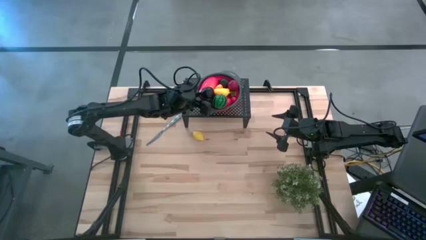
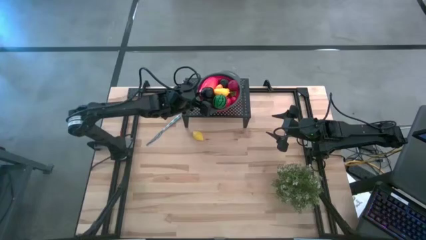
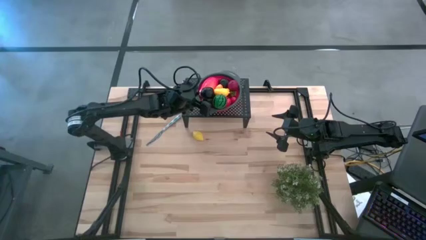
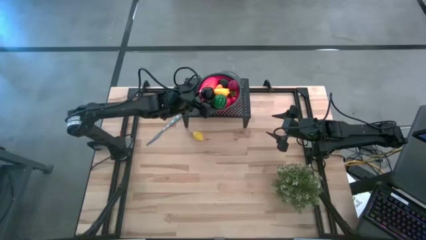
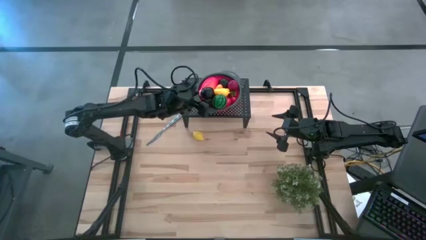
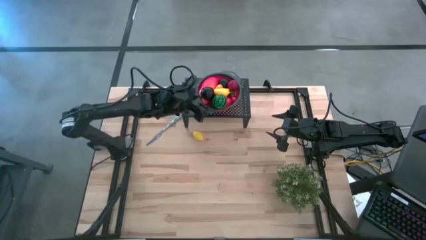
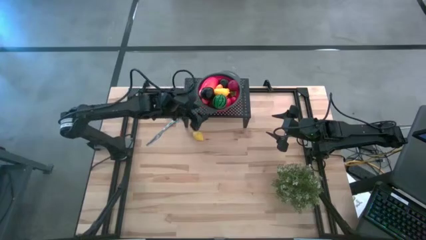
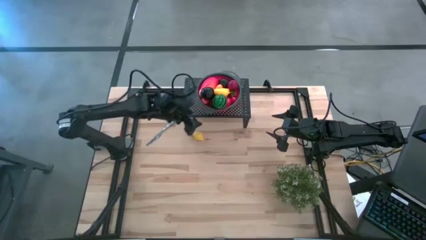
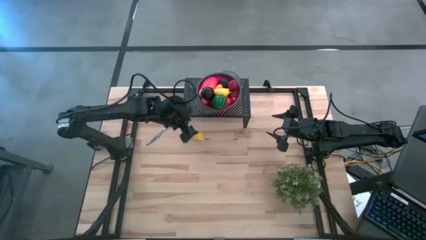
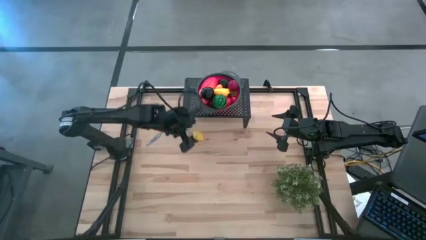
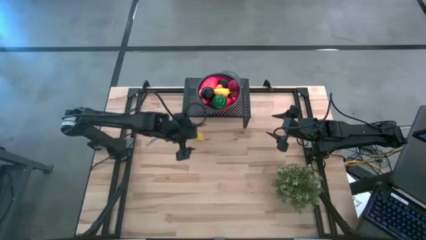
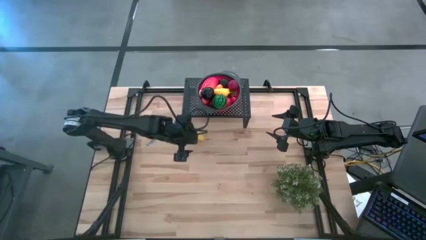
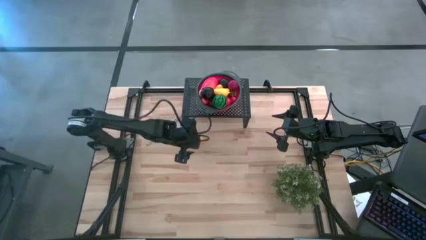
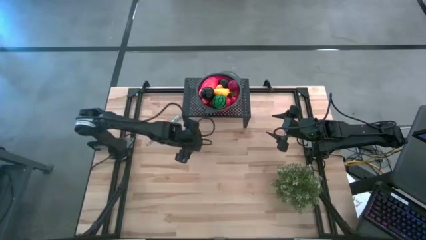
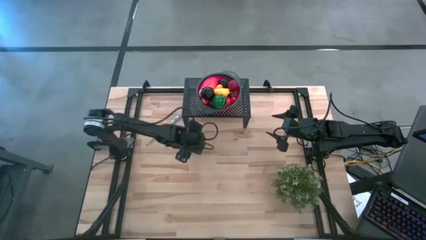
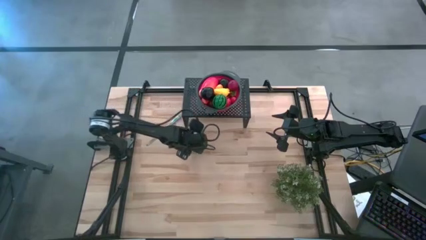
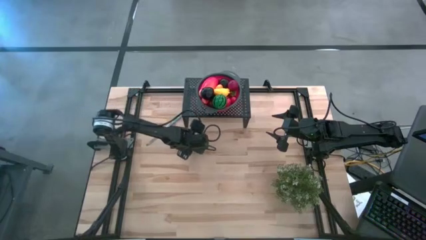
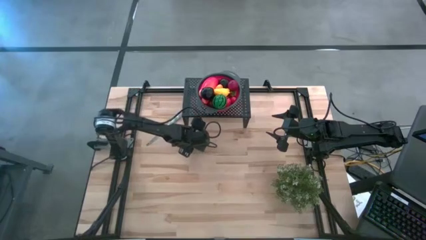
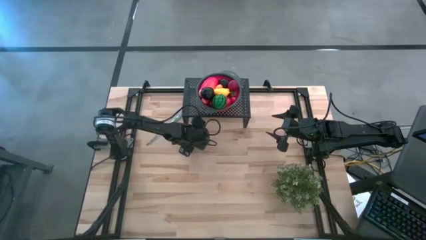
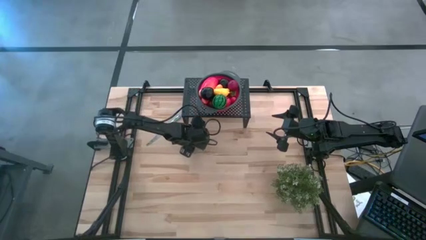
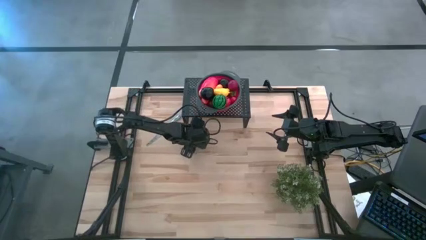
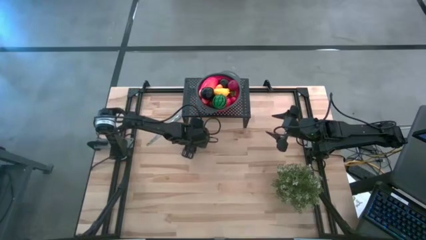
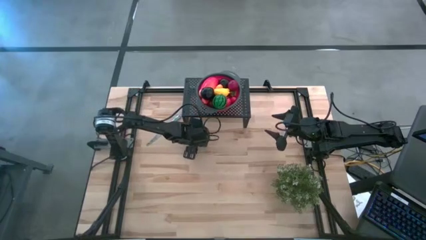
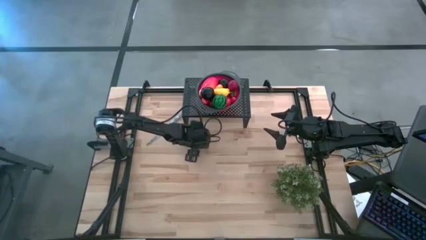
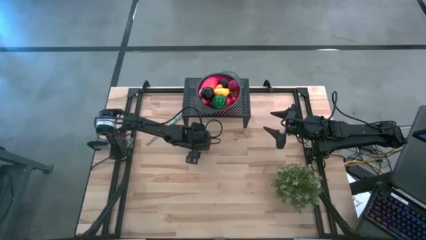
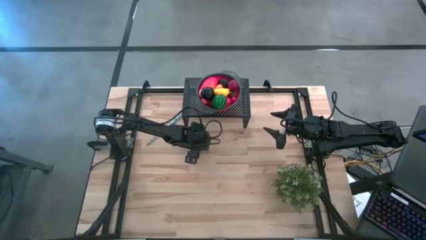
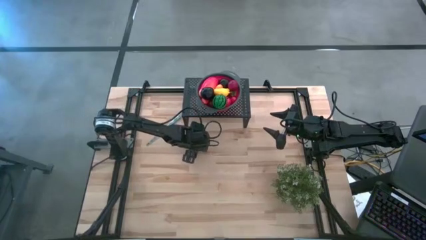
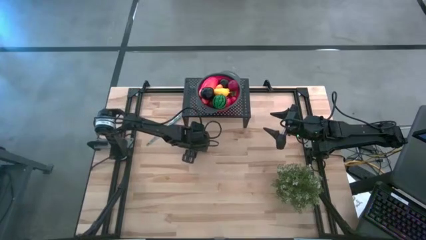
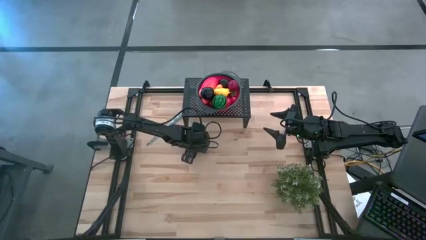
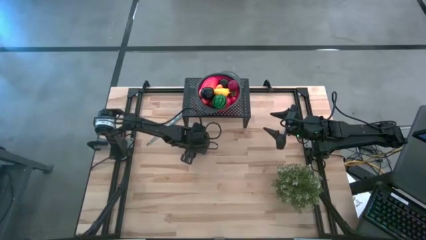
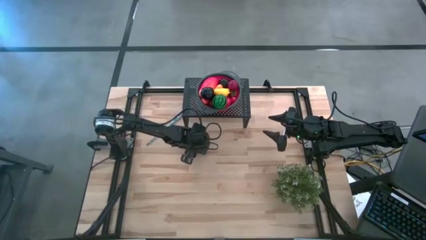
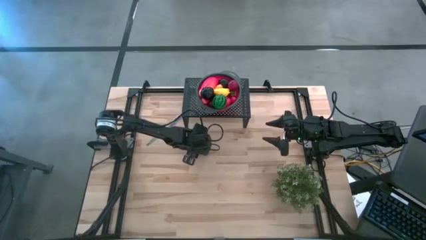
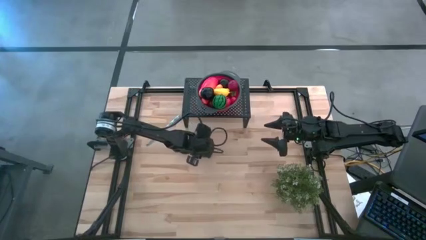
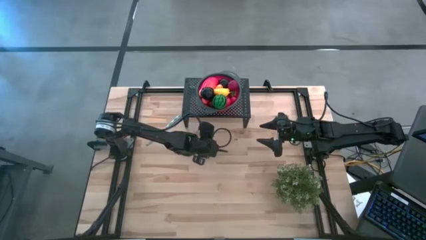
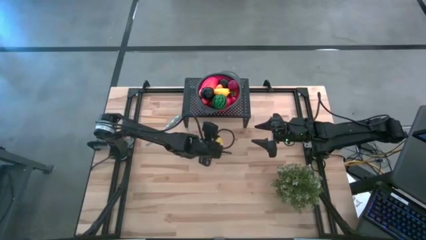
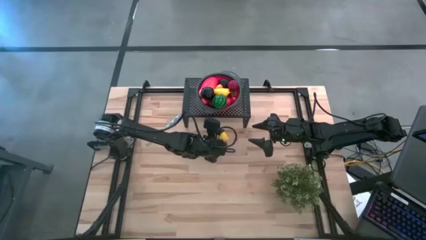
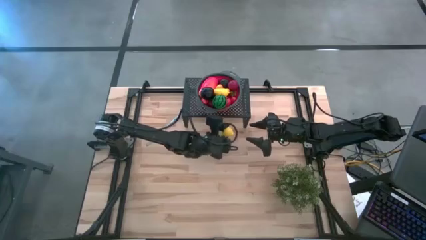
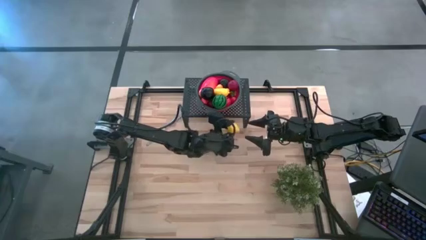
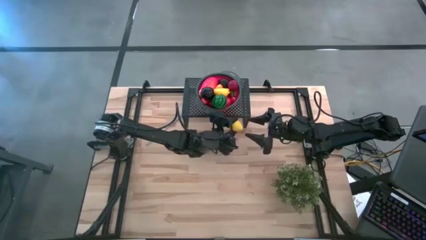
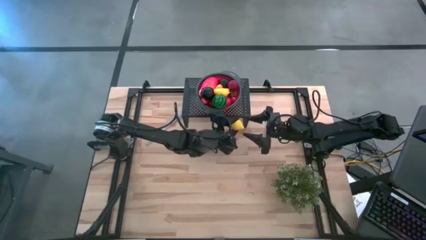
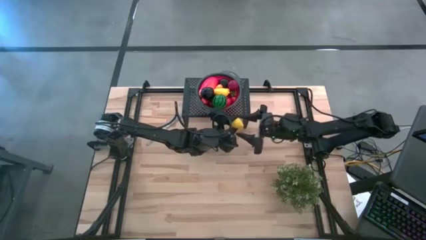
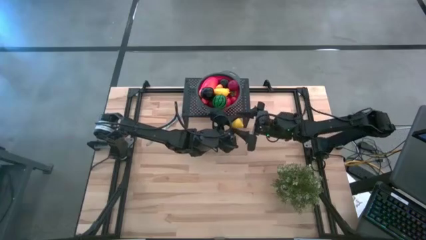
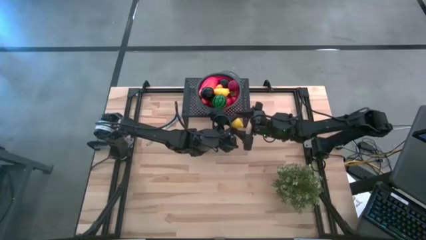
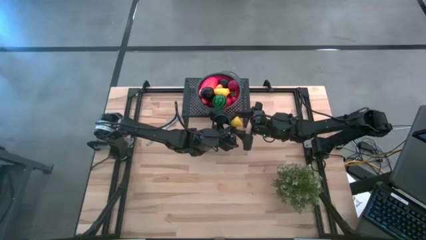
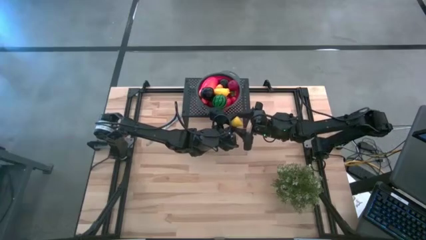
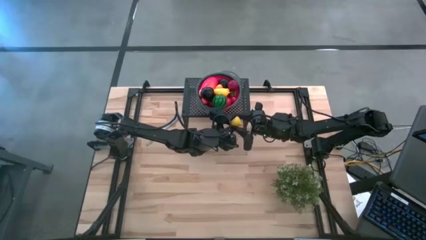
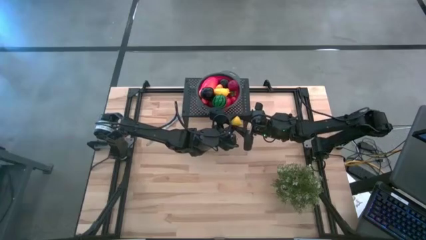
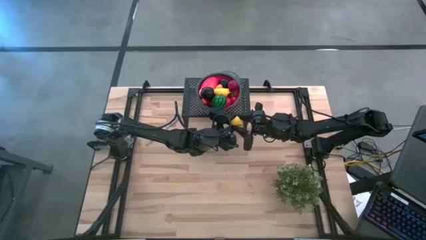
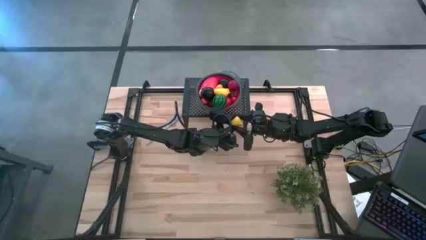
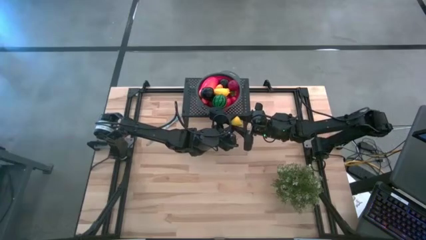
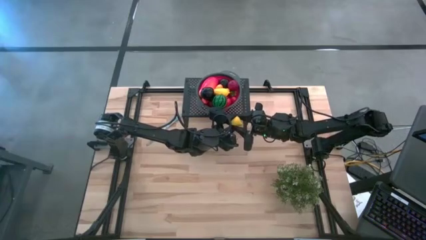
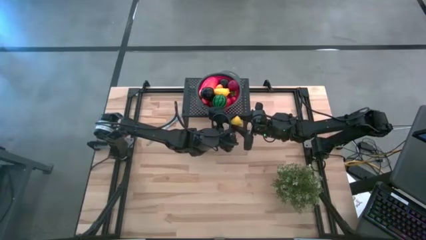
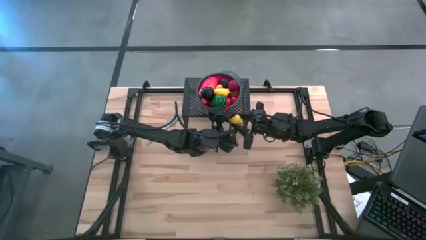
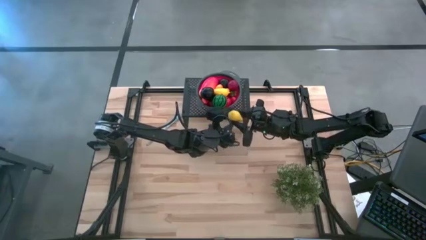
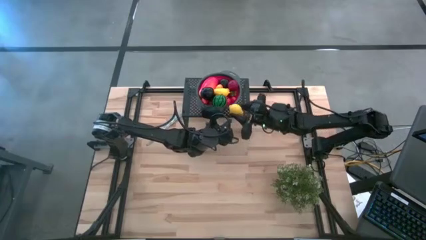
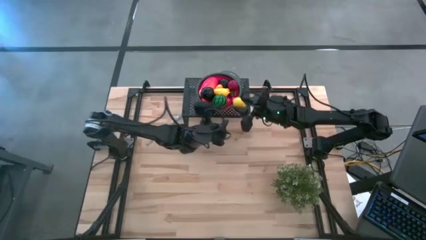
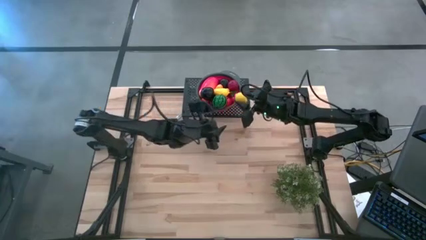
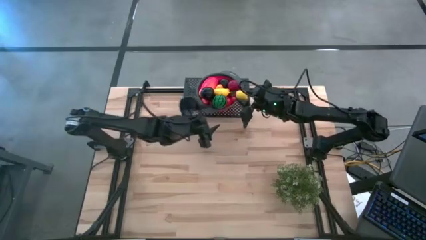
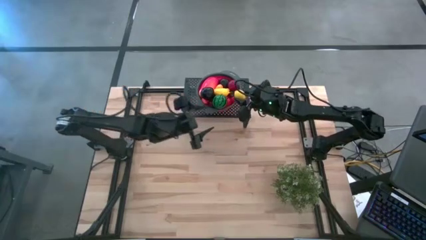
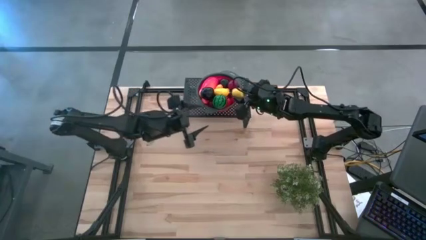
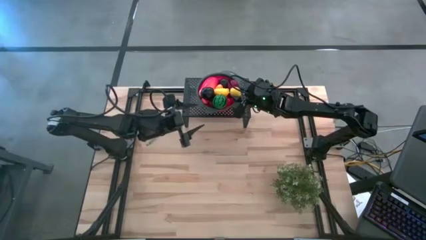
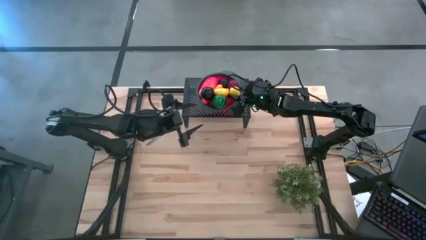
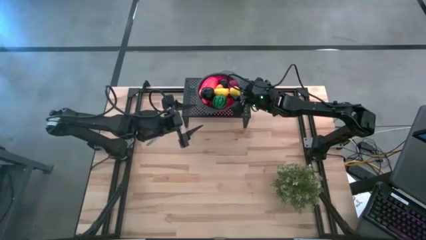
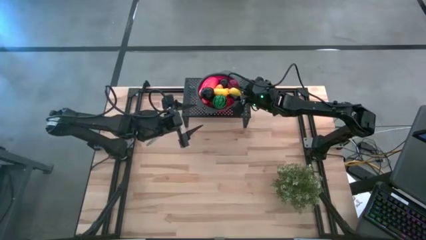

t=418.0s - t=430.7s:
Task: Pick & Place Fruit
Put the lemon in the red colander on the shelf

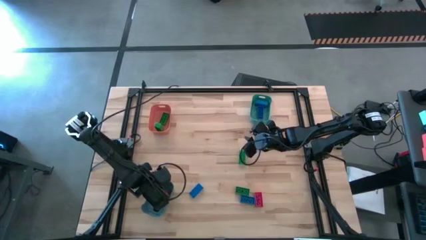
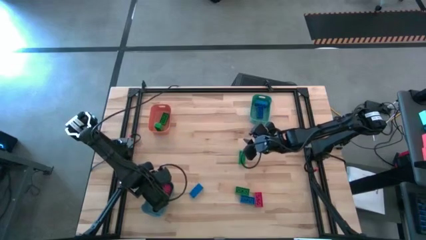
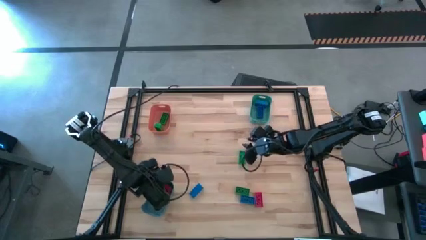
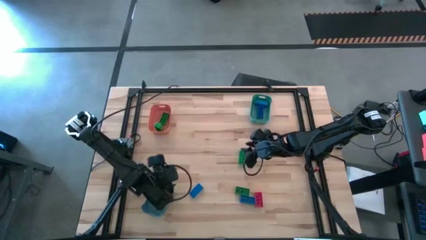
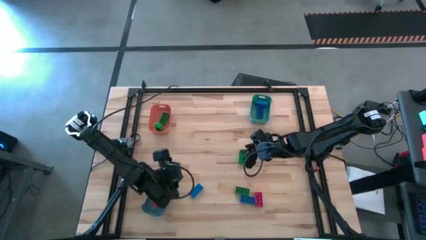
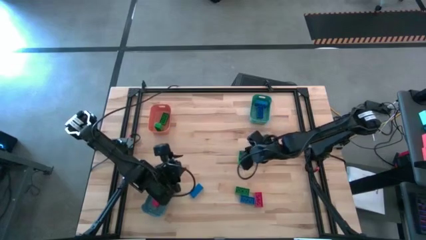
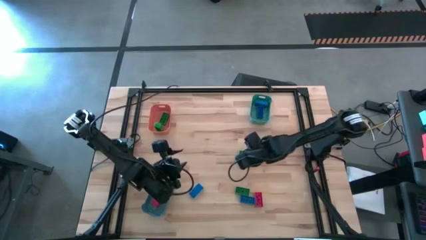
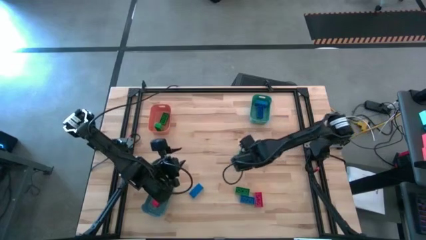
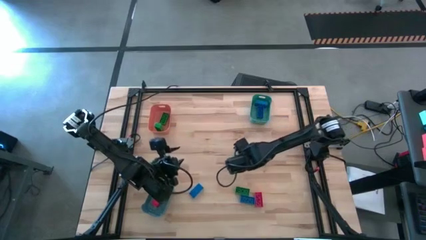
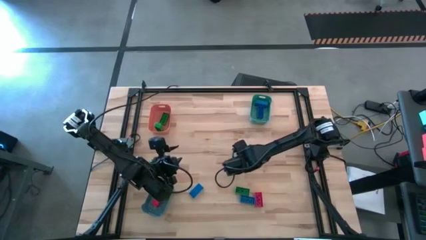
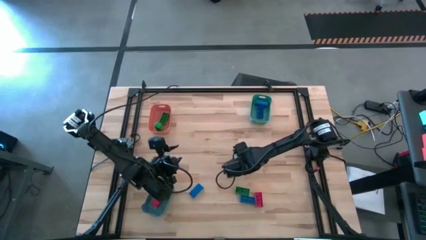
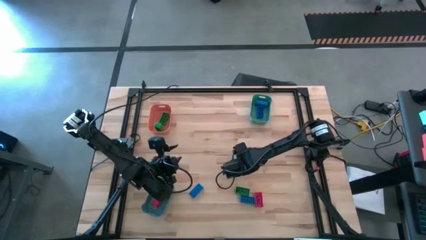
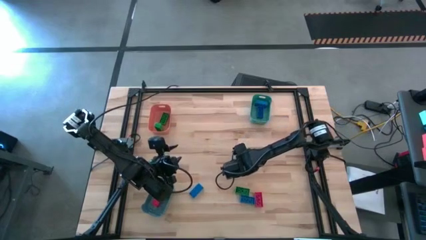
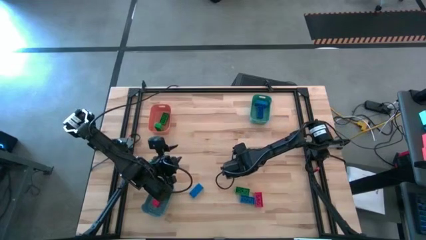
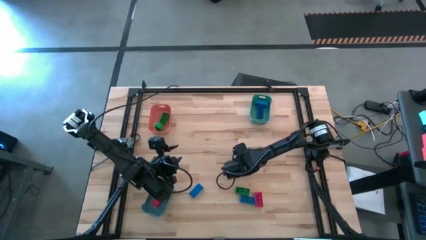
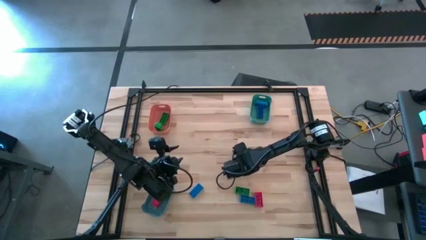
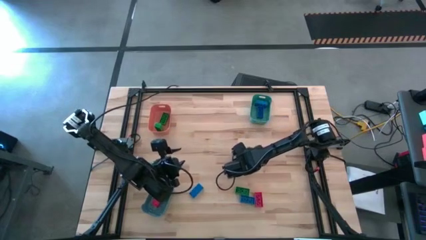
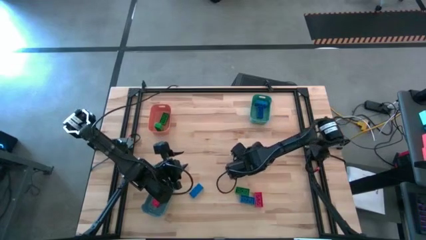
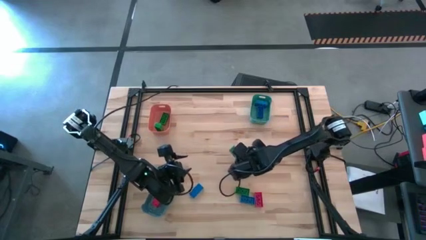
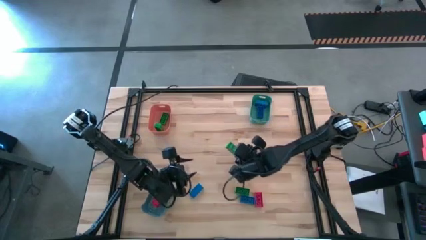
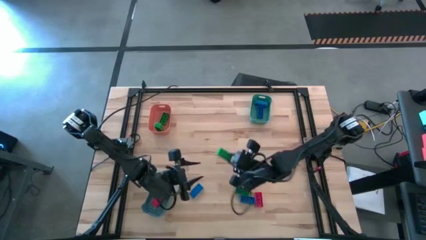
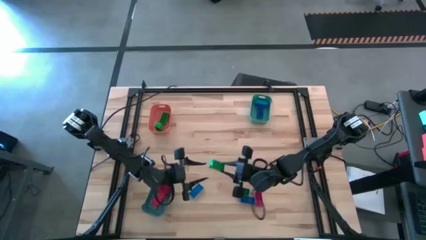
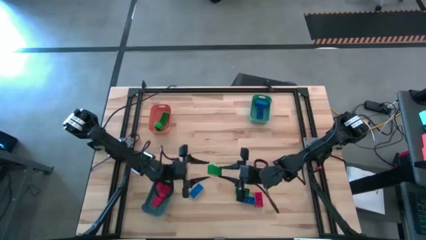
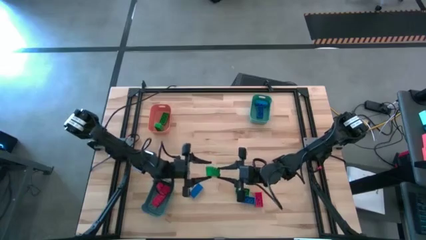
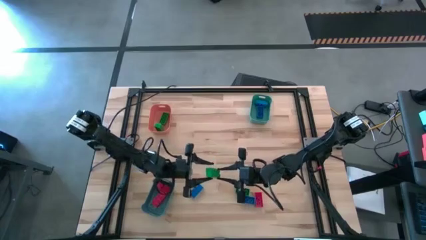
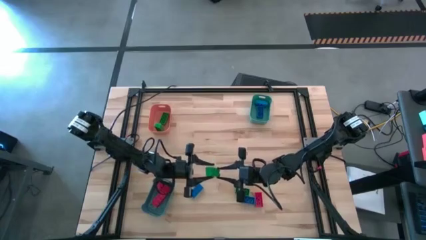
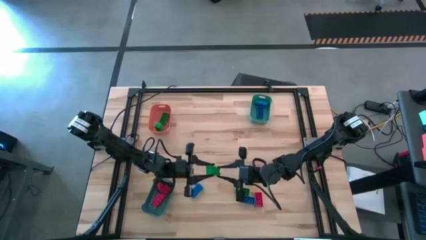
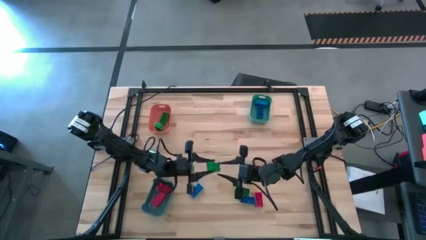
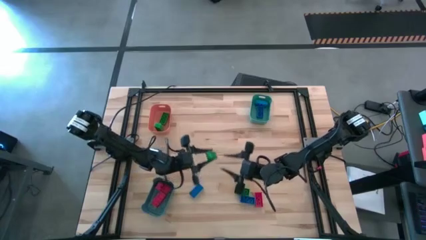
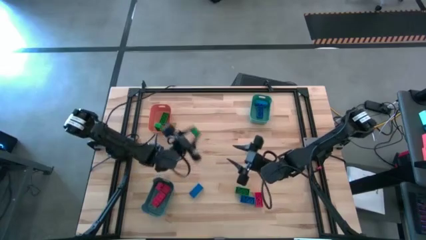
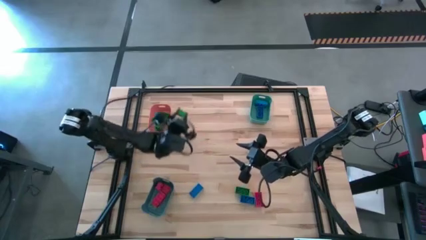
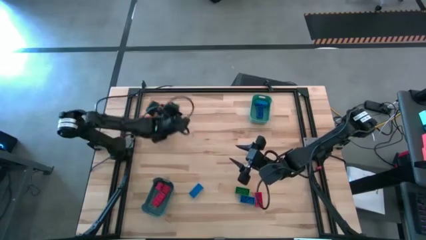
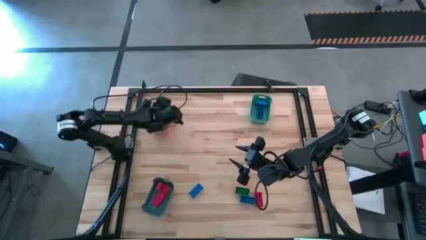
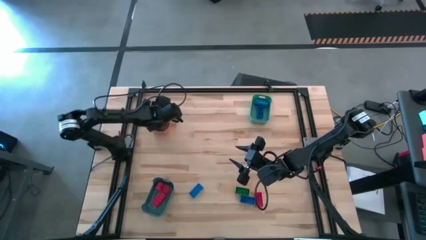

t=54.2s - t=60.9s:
Task: Sort & place blocks by color
Put the green game piece into the orange bin
